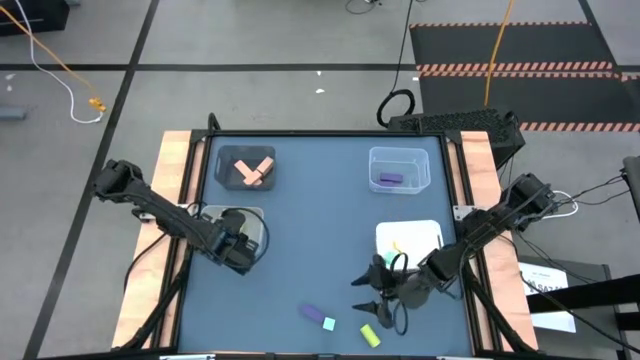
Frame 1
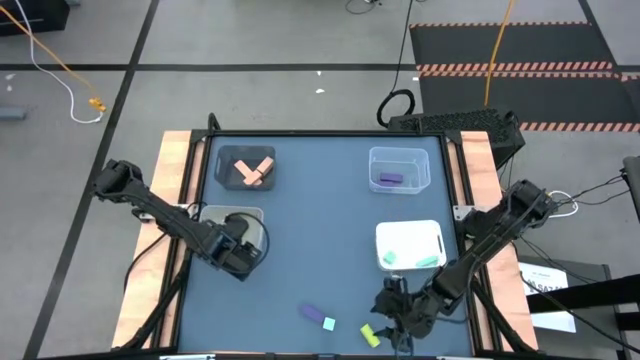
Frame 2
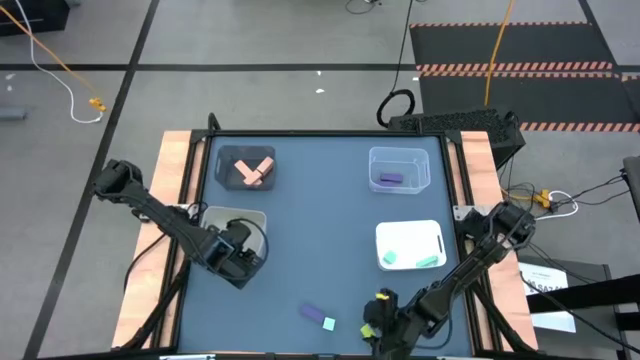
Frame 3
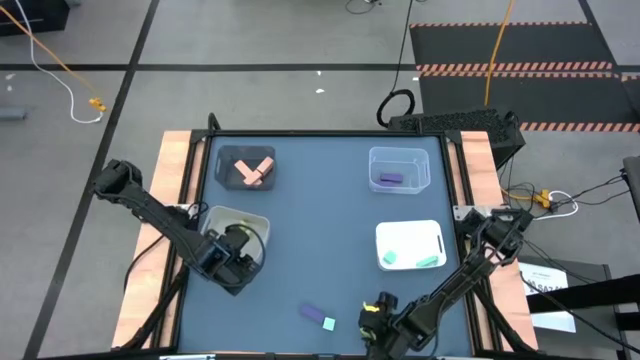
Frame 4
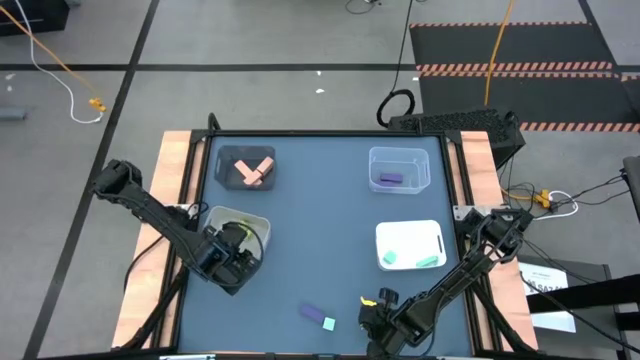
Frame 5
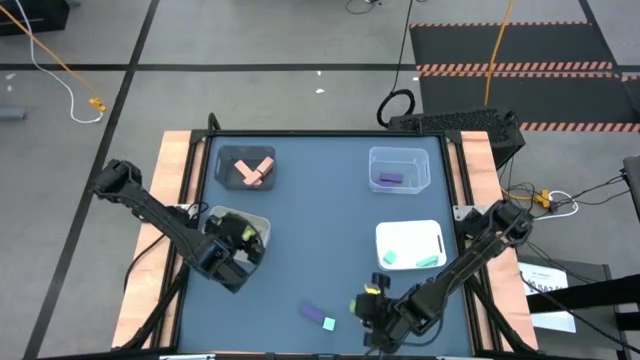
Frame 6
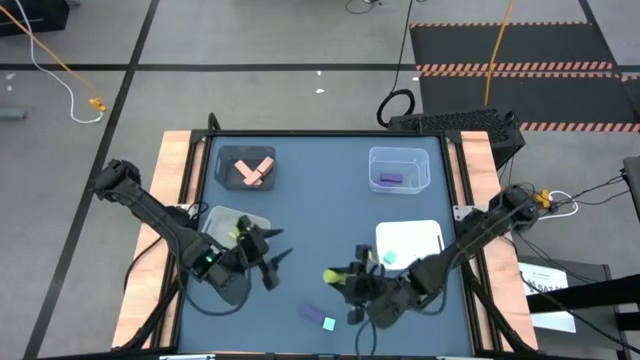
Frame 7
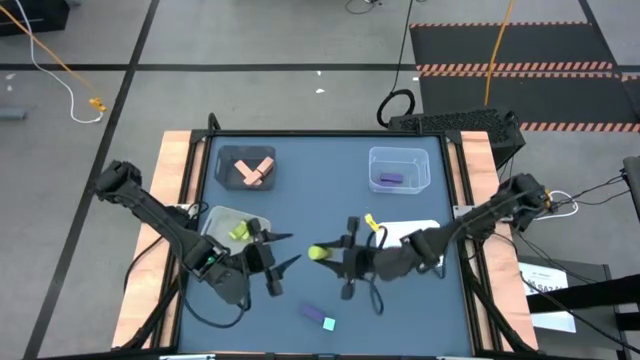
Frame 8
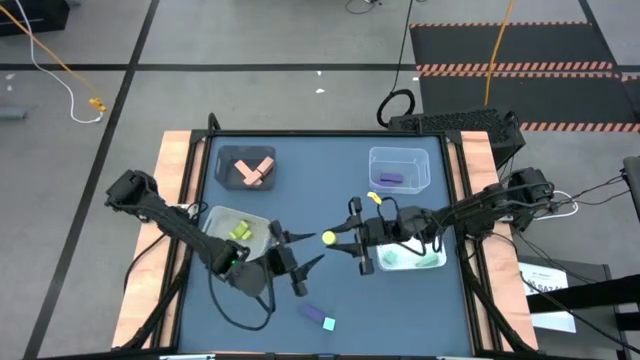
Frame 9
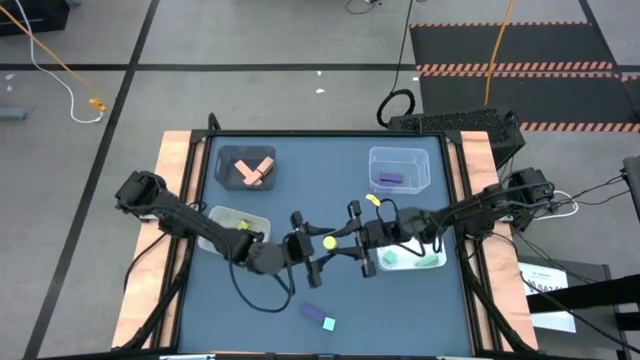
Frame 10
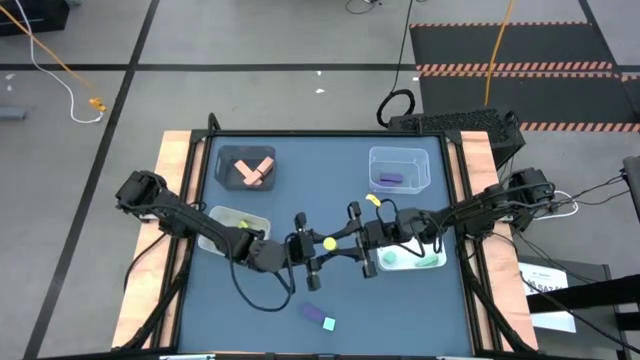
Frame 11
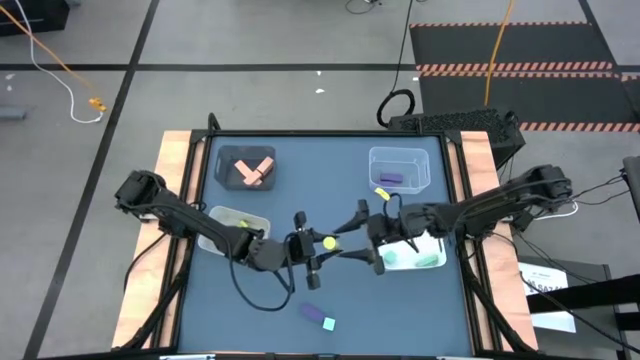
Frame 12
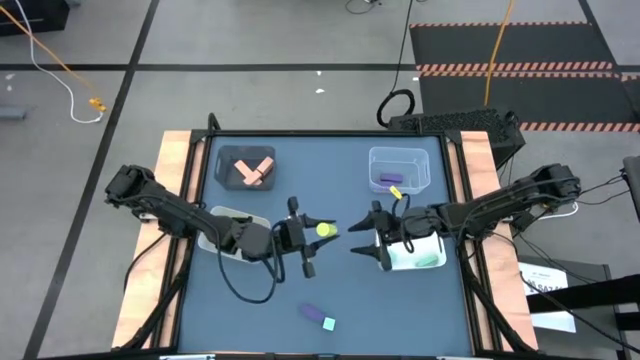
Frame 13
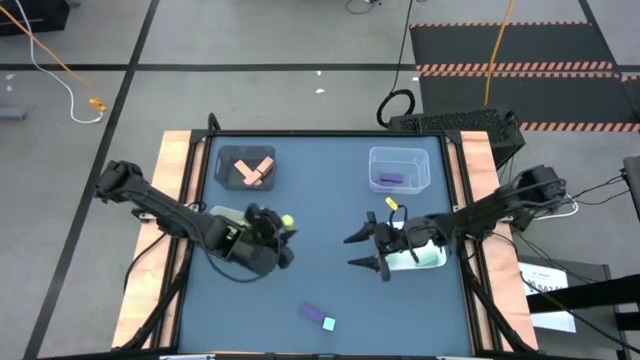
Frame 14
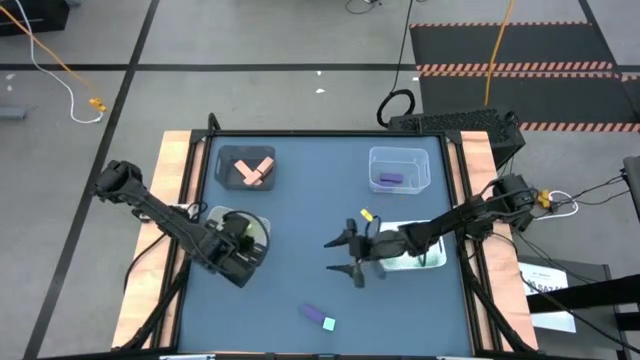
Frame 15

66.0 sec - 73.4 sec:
Task: Sort & place blocks by color
Put the green block into the gray bin

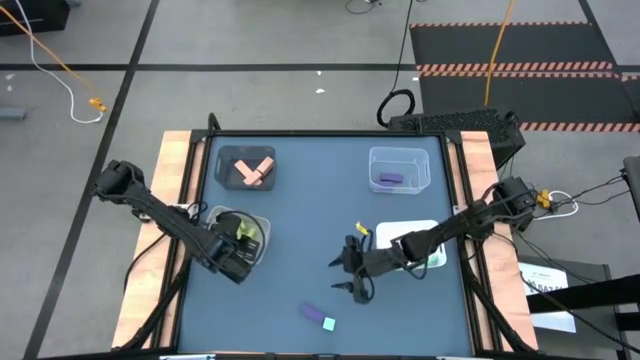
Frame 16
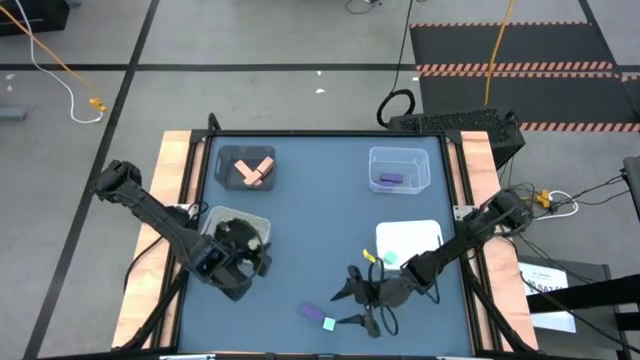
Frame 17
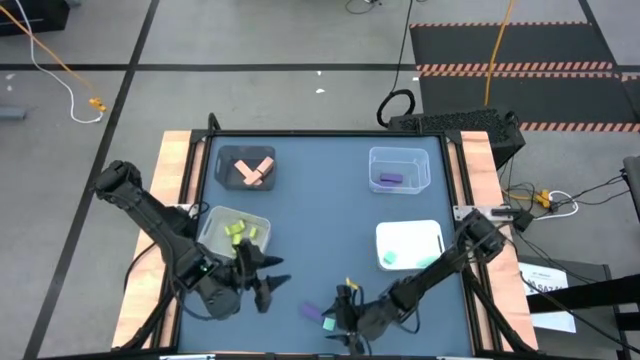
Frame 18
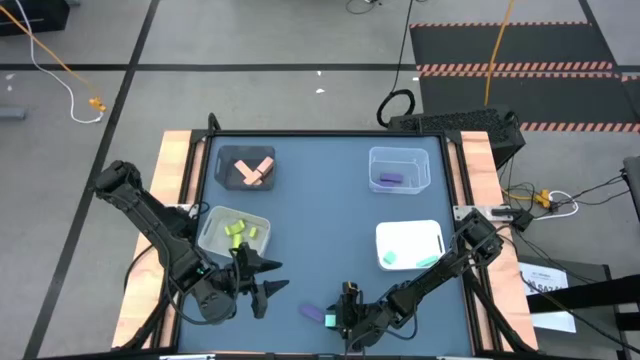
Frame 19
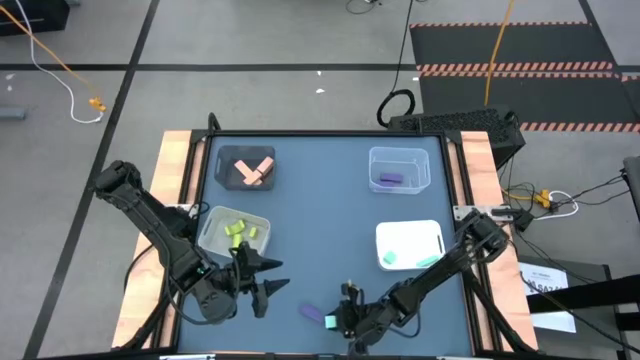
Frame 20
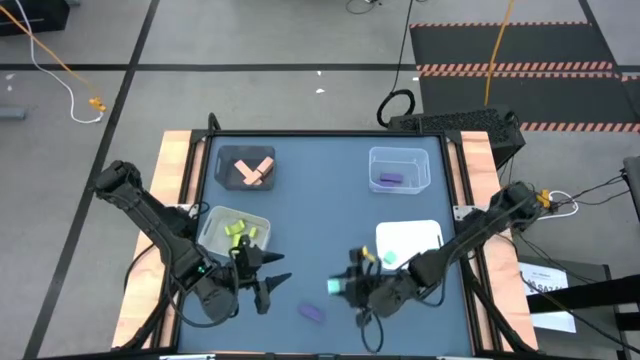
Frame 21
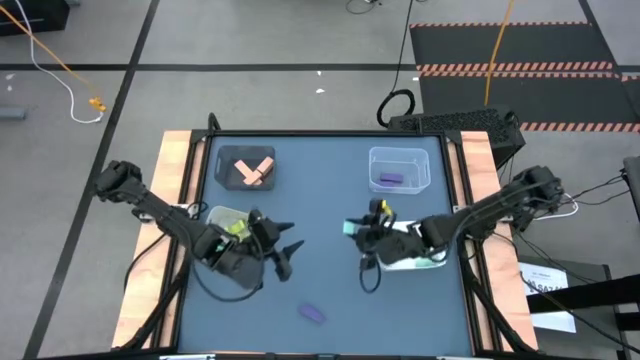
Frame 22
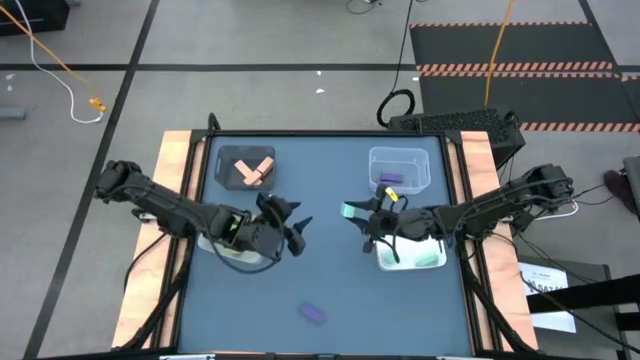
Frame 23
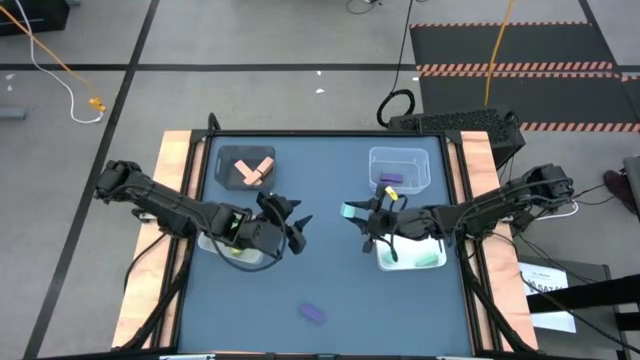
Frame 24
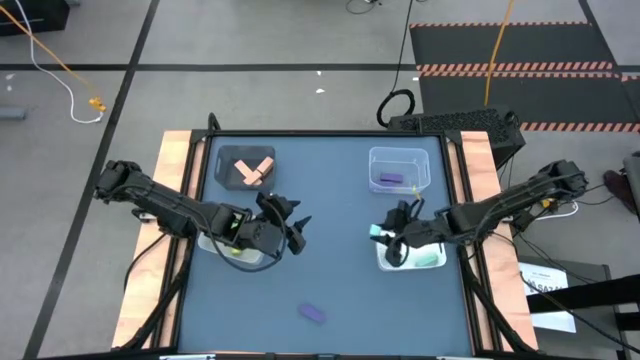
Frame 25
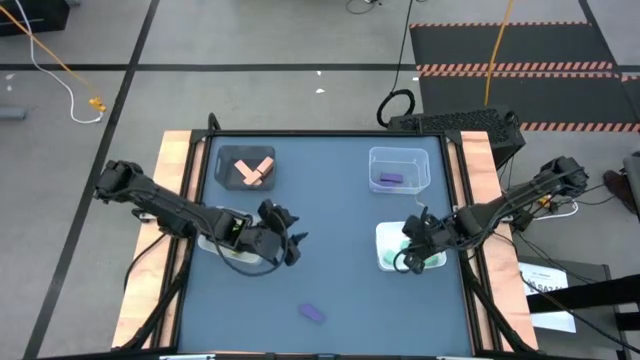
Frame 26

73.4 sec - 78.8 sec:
Put the blue block into the white bin

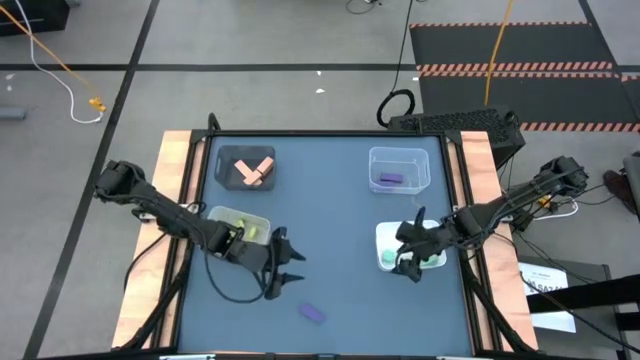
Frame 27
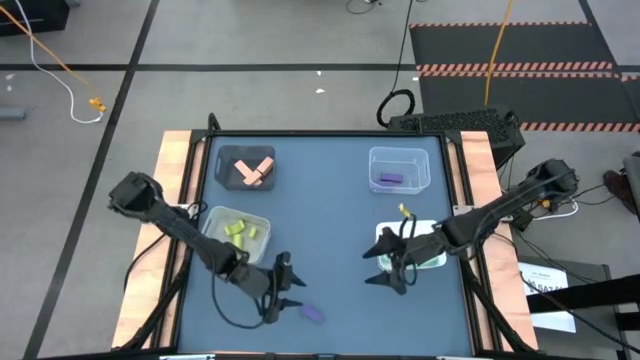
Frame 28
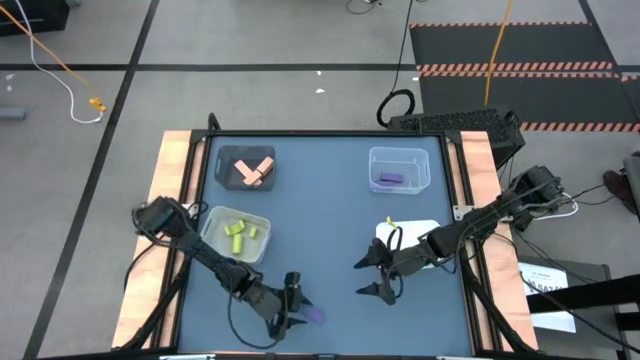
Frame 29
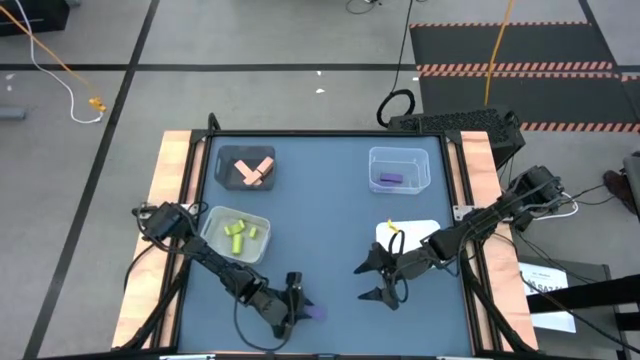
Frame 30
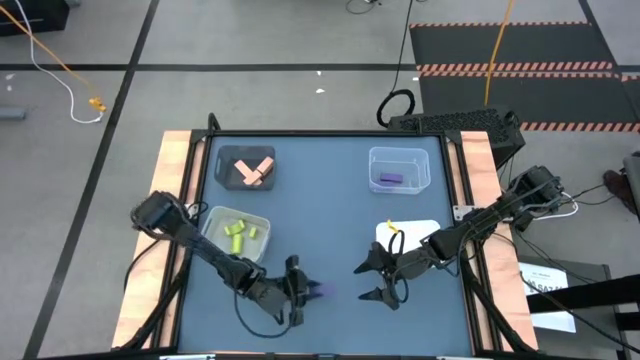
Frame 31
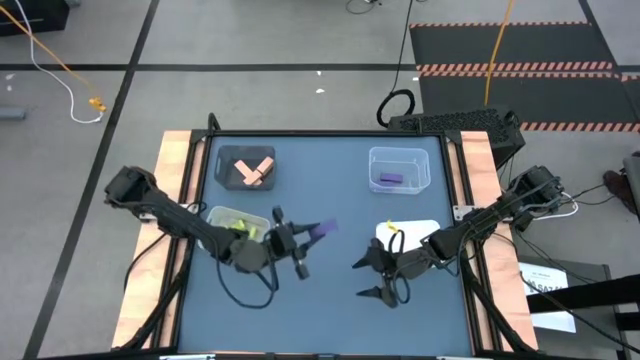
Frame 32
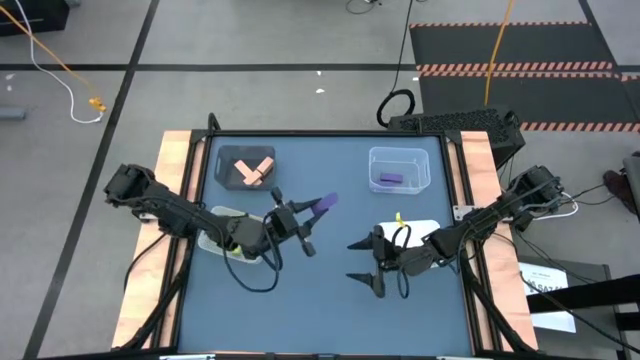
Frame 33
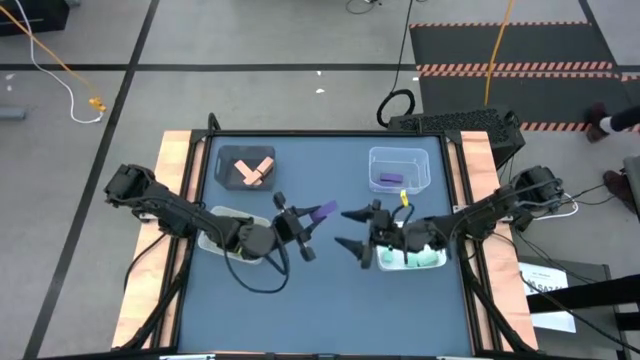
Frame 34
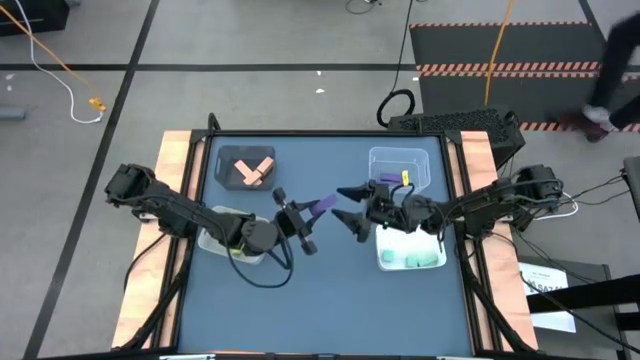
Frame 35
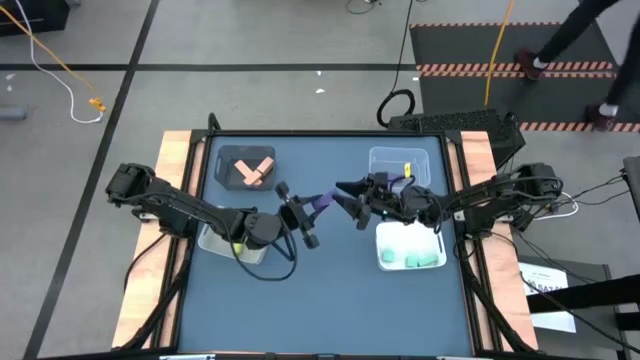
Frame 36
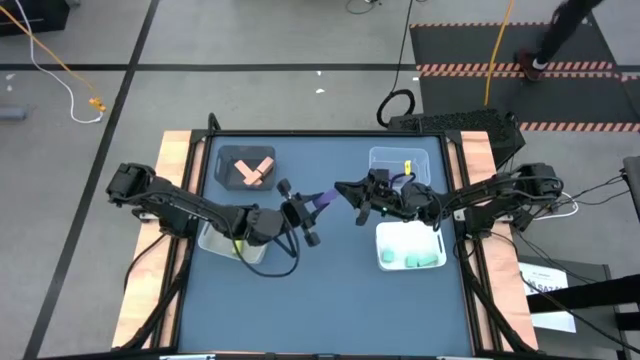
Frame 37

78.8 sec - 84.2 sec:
Put the purple block into the transparent bin

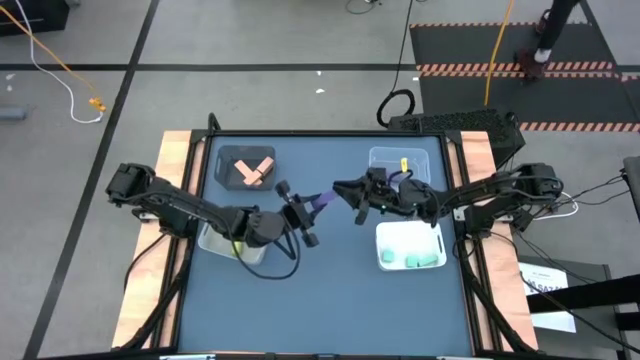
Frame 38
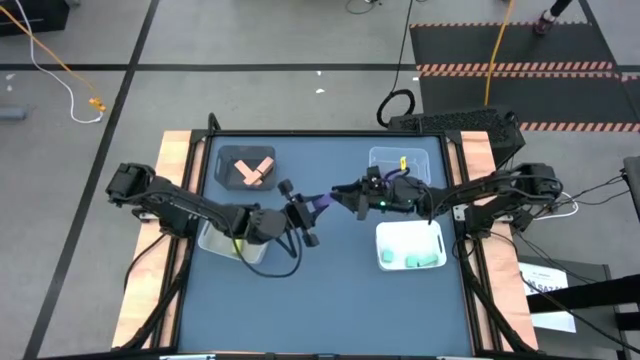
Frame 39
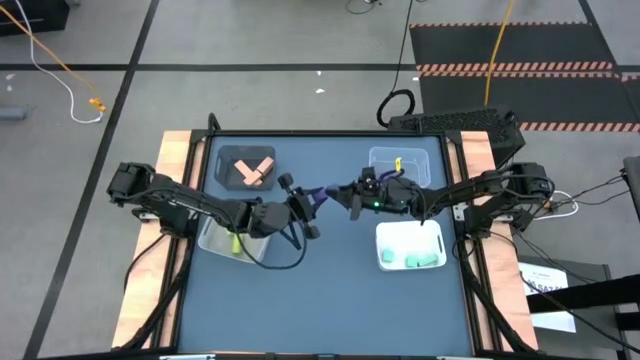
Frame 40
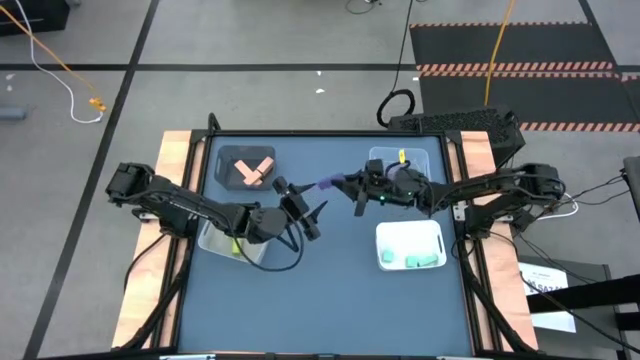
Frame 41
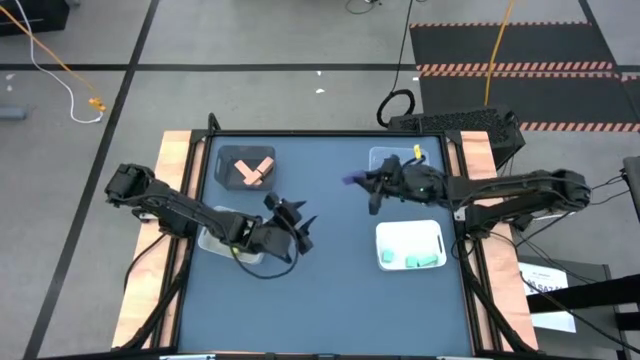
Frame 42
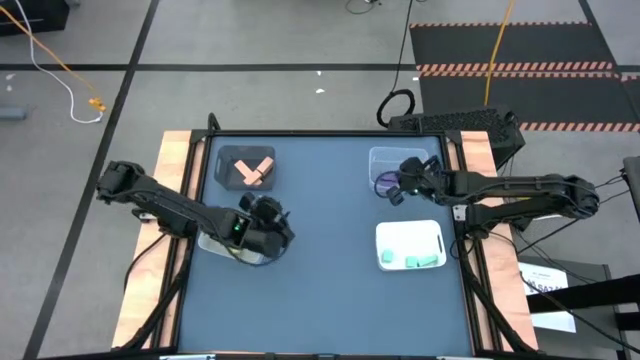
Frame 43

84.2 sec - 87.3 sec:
Put the purple block into the transparent bin

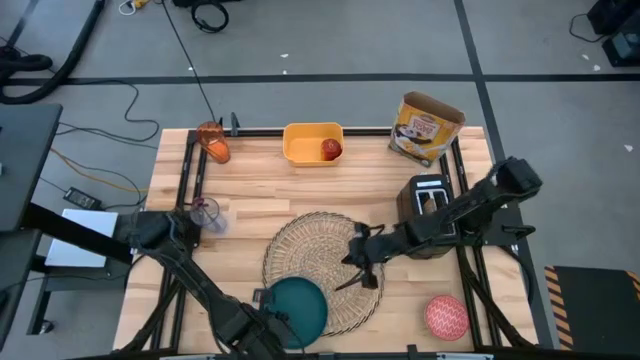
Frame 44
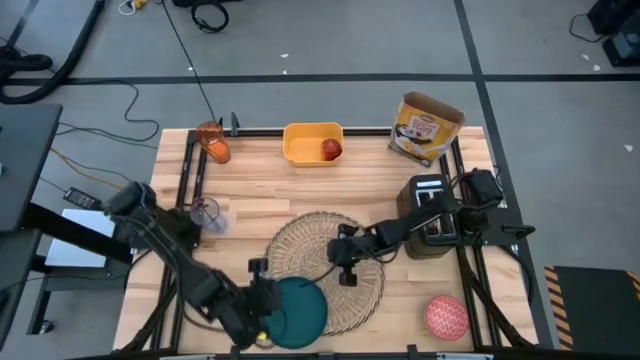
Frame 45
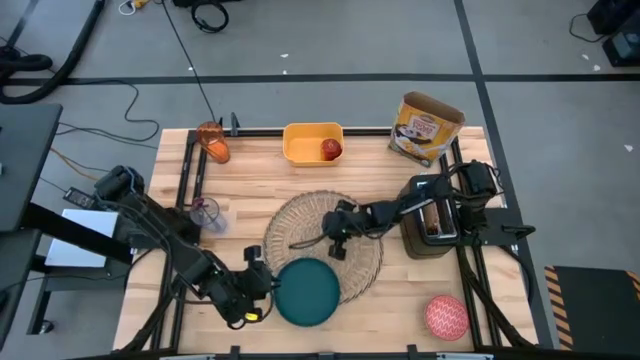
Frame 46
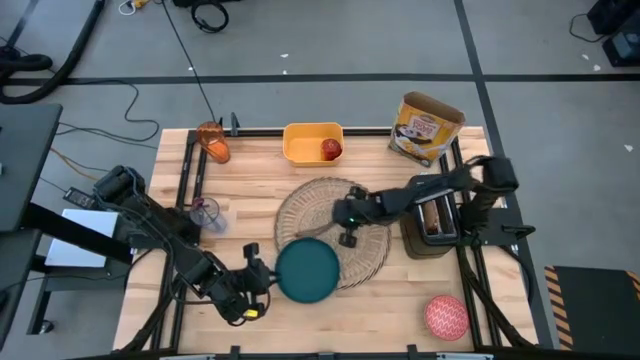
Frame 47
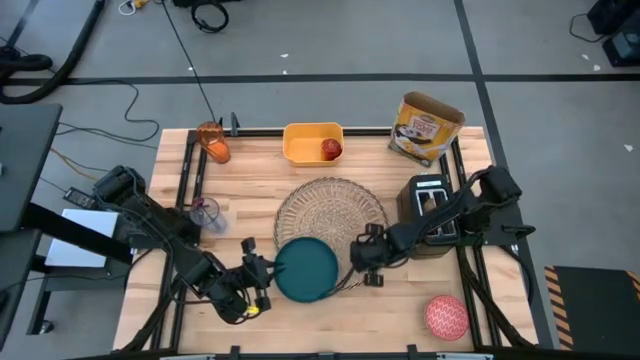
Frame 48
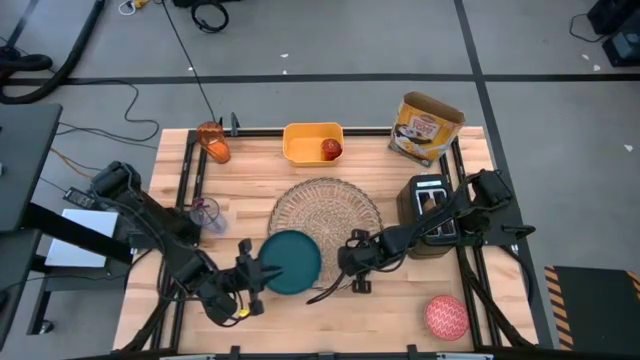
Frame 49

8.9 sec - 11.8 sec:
Task: Arrange a breakfast setting
Move the brown table mat to the center of the table
